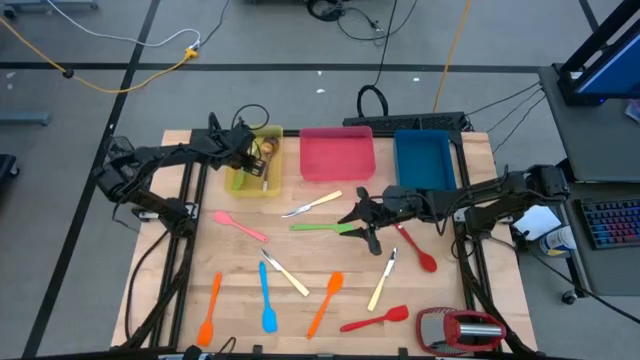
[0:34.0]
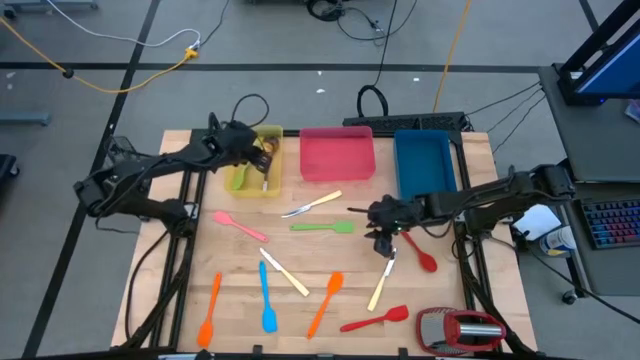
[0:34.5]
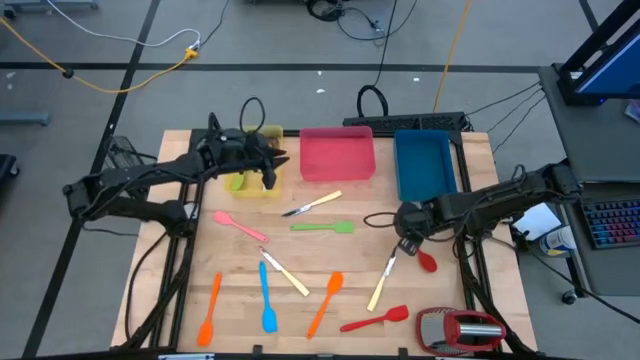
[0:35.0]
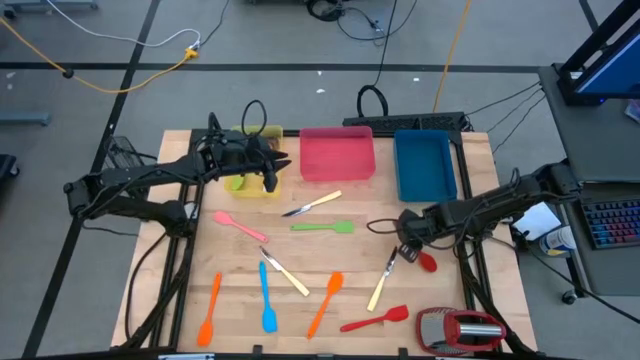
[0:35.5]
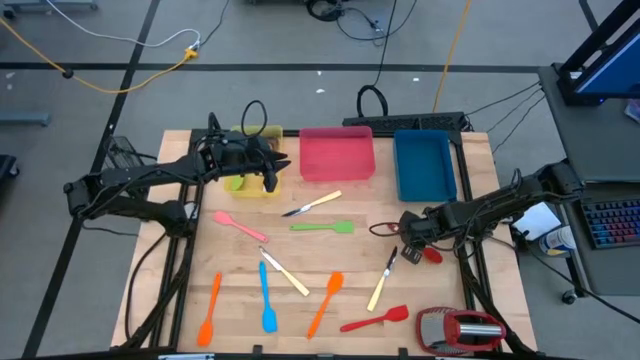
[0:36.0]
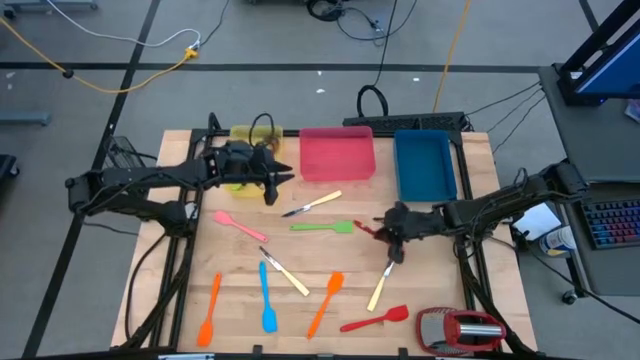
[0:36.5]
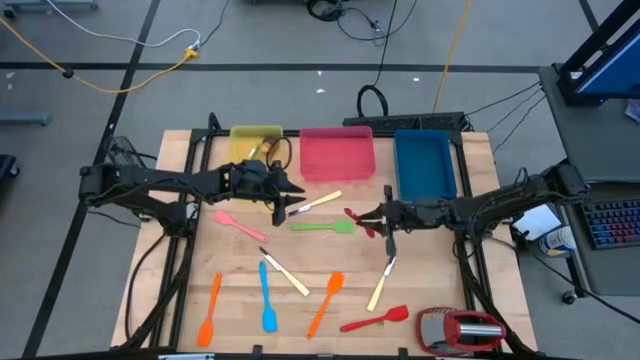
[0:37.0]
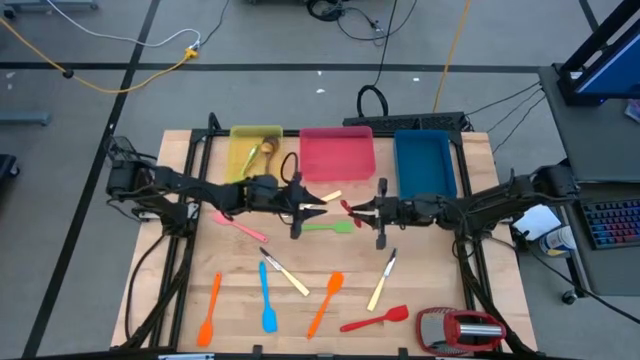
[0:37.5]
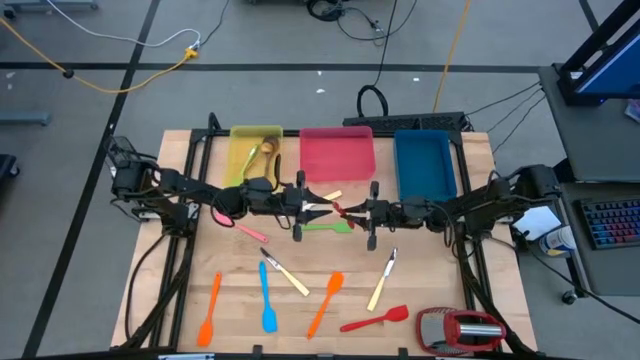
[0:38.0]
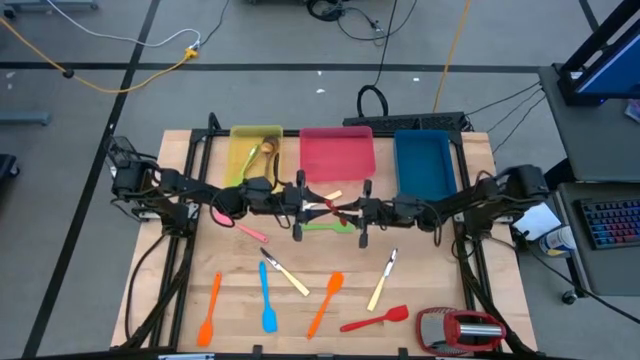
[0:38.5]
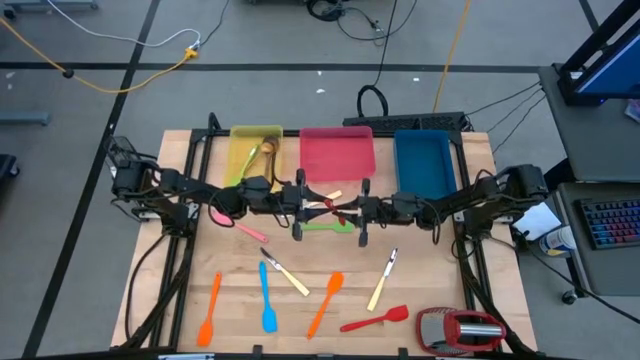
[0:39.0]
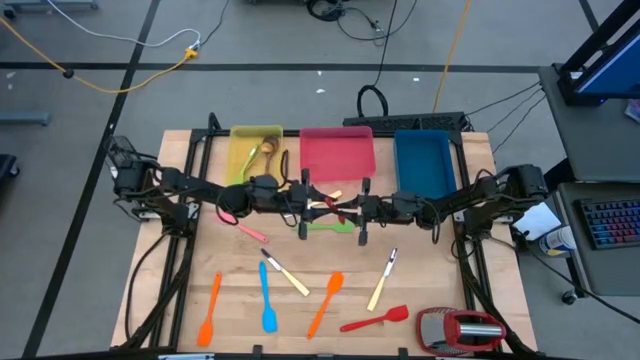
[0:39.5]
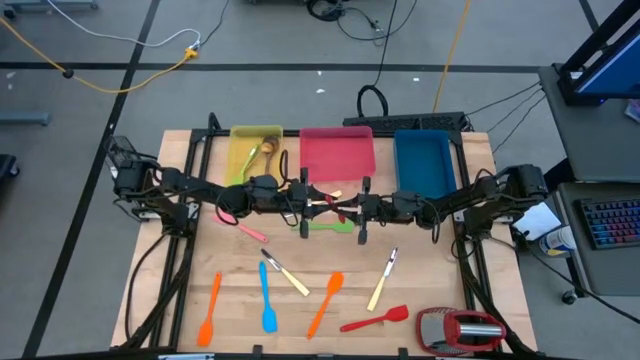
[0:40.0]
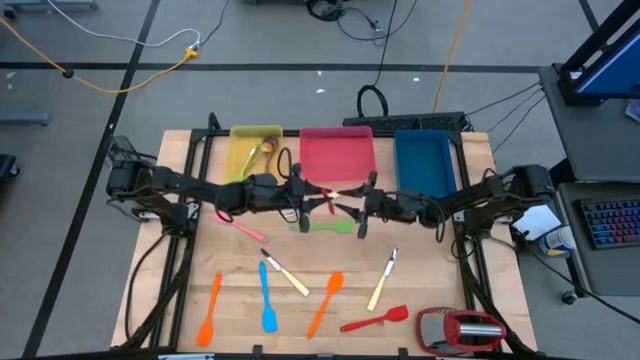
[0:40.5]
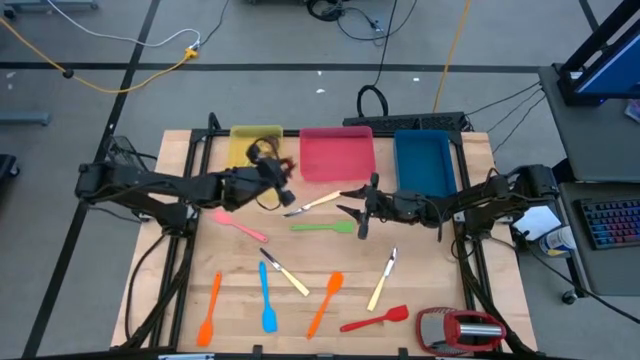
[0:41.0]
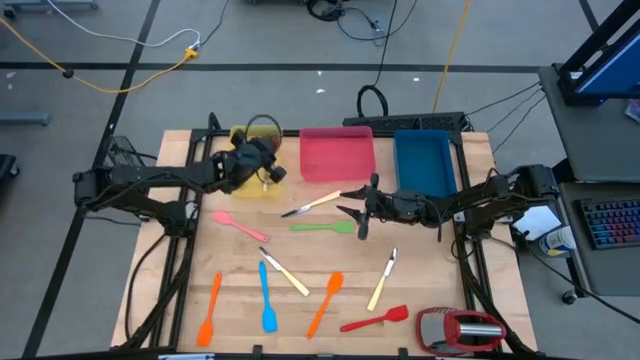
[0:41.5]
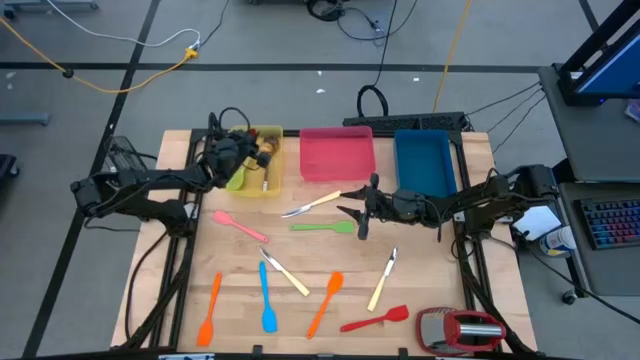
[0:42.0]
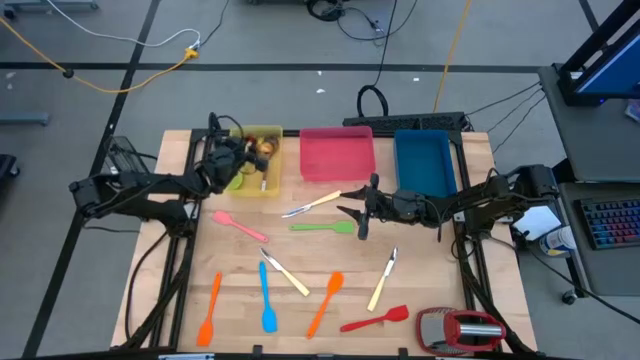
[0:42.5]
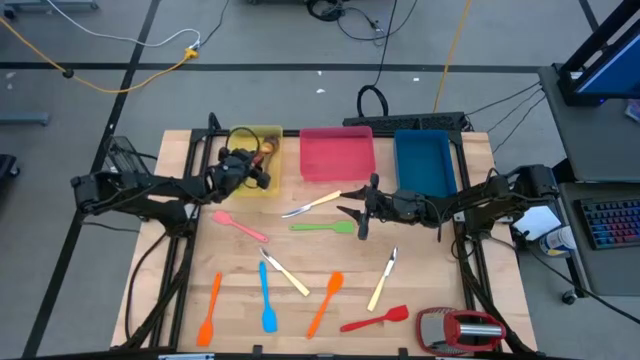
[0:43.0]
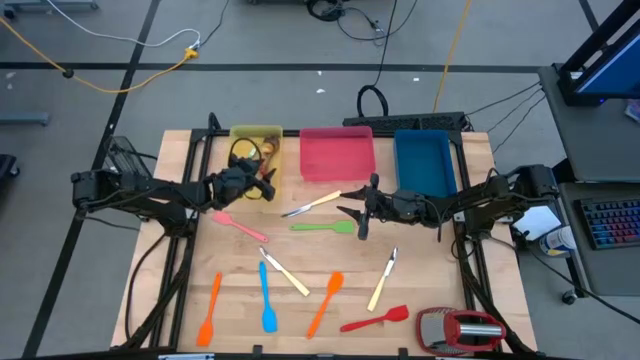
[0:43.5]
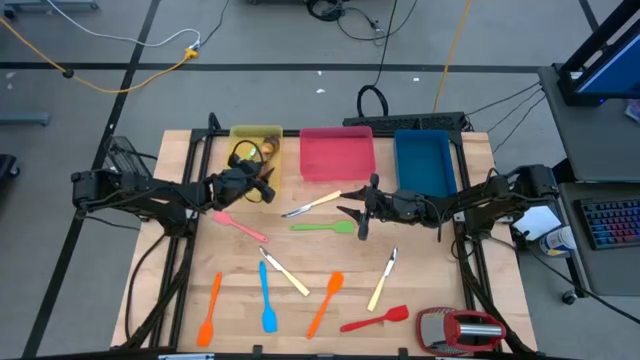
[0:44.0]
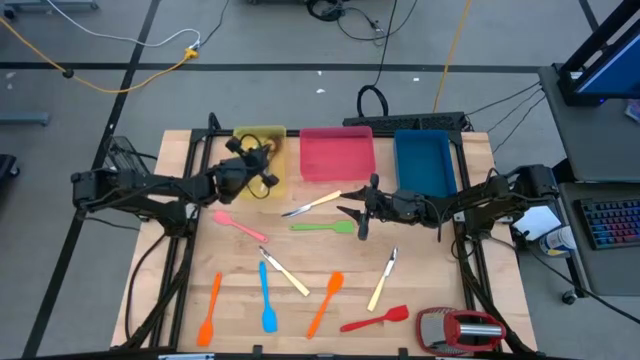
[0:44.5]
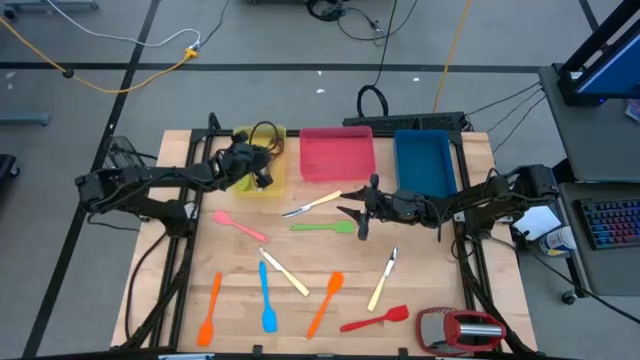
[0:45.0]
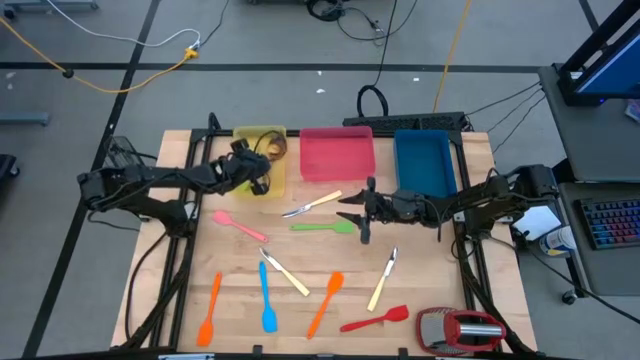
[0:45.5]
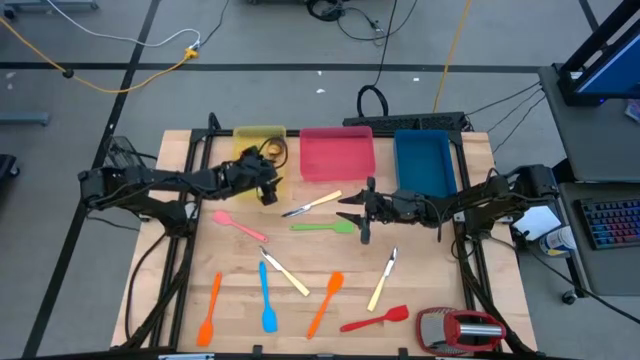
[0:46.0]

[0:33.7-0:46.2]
Task: Pick & Place Kitchen Items
Put the red serving spoon into the yellow bin

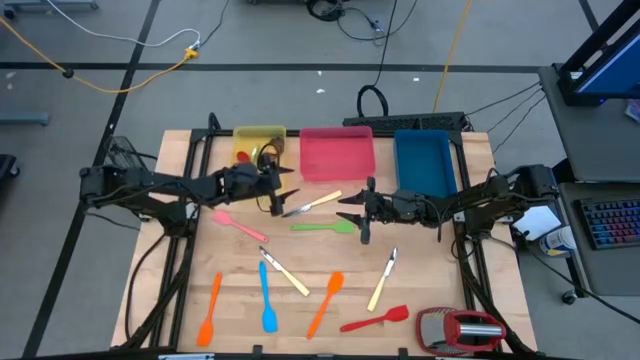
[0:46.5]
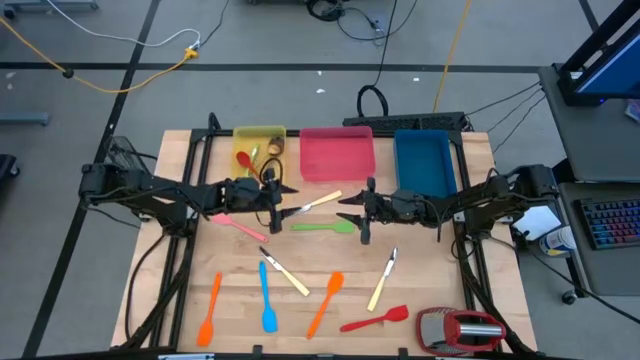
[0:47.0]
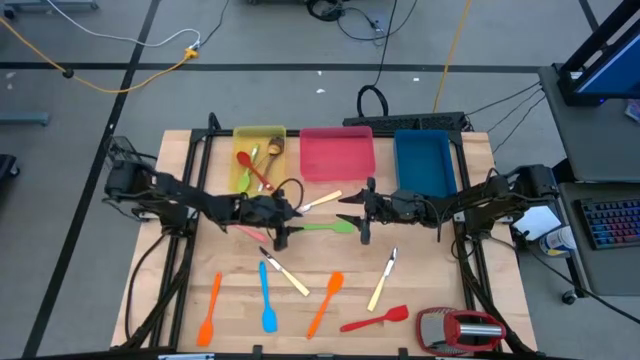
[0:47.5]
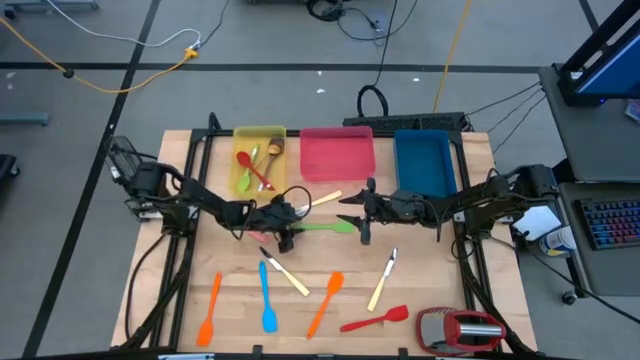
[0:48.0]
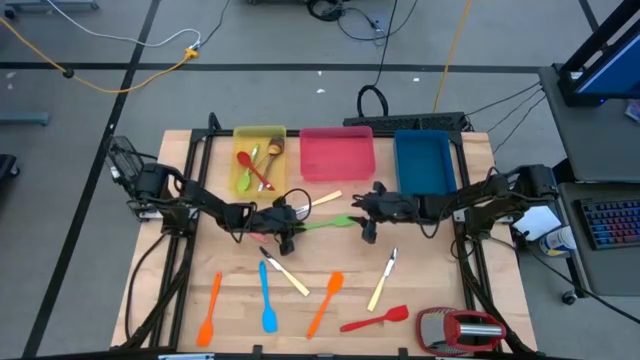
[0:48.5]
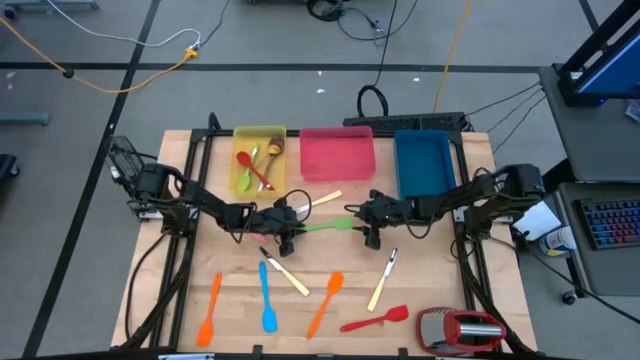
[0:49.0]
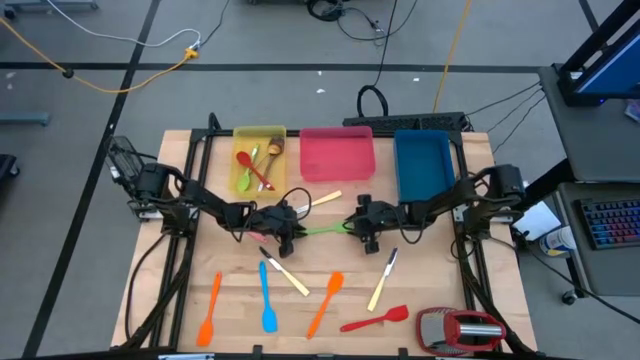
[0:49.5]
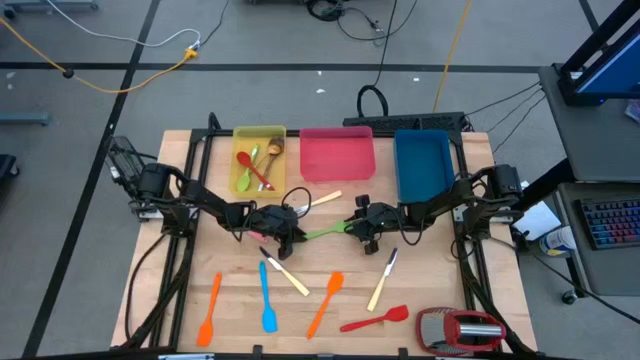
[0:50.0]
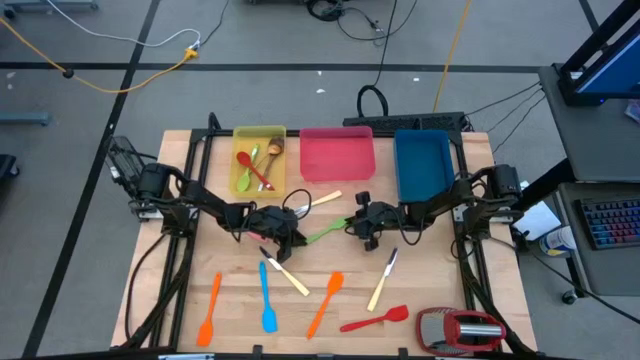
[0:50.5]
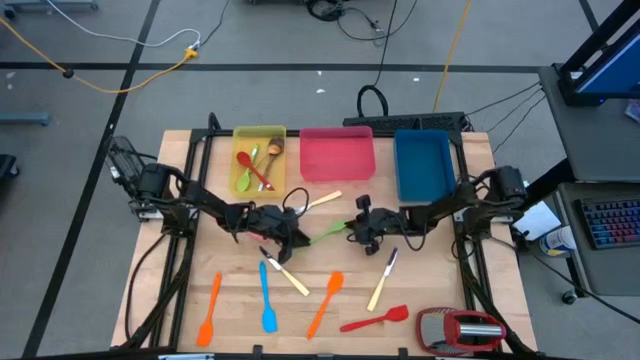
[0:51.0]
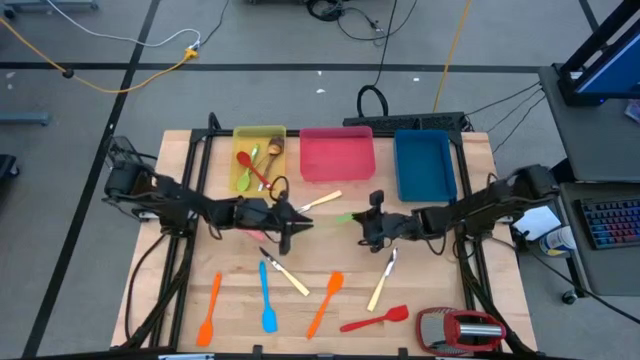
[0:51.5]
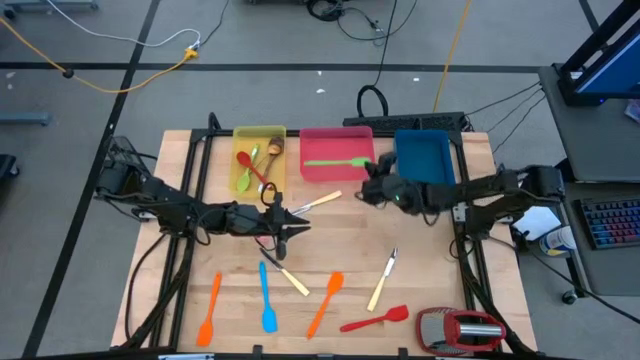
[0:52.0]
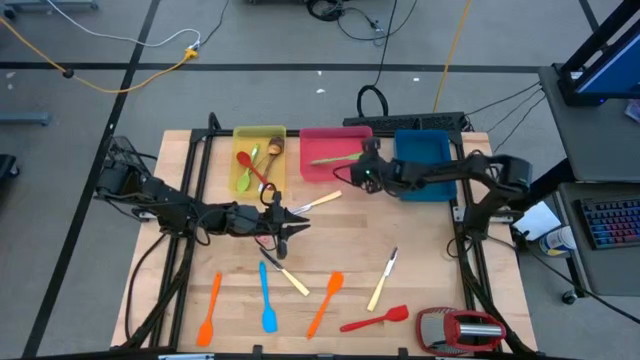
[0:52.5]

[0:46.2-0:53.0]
Put the green spatula into the red bin

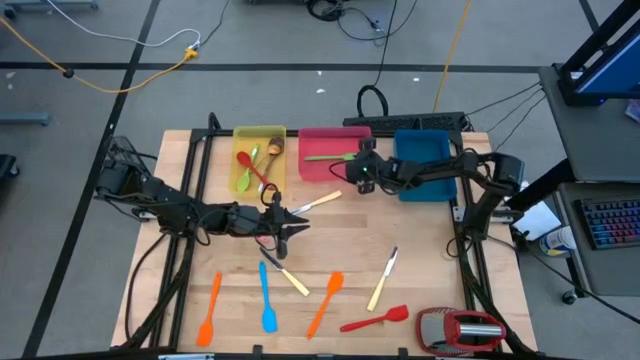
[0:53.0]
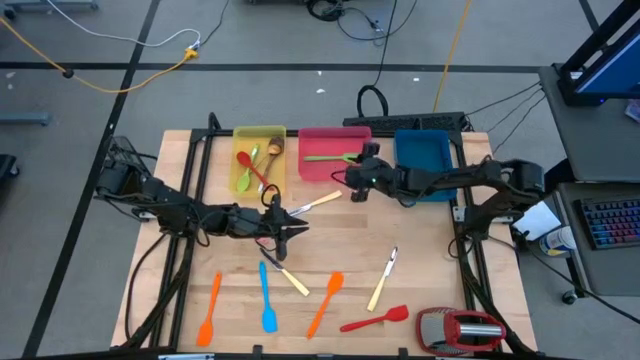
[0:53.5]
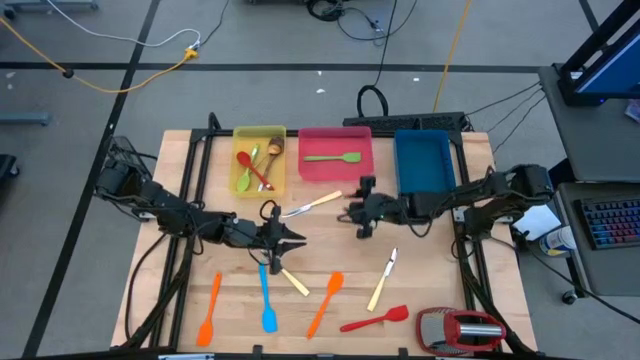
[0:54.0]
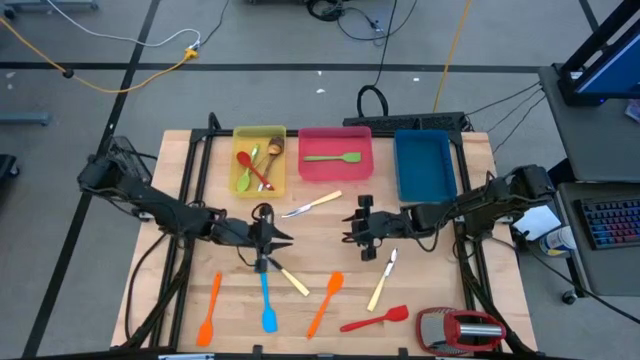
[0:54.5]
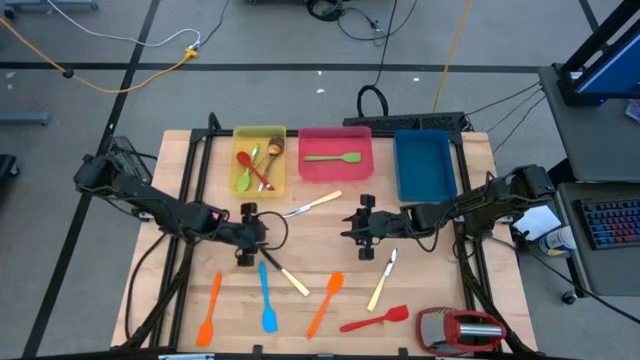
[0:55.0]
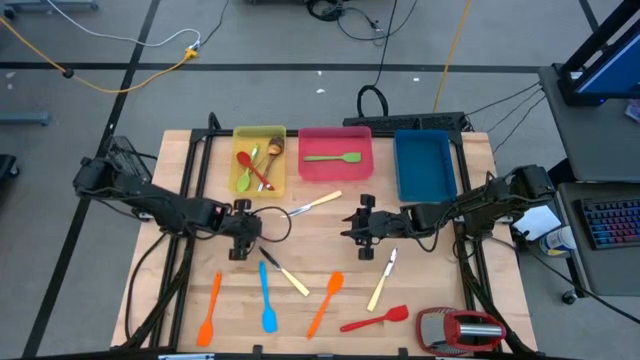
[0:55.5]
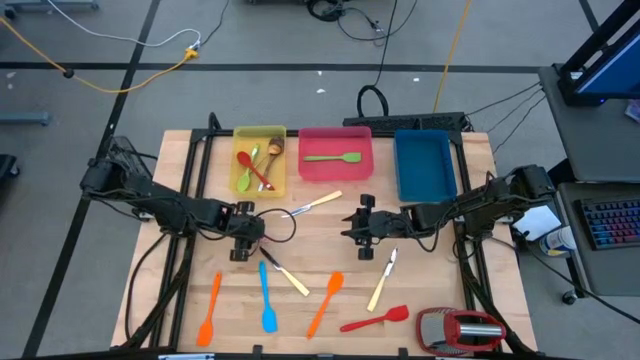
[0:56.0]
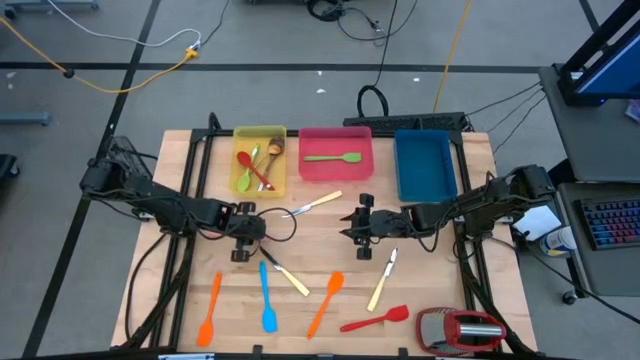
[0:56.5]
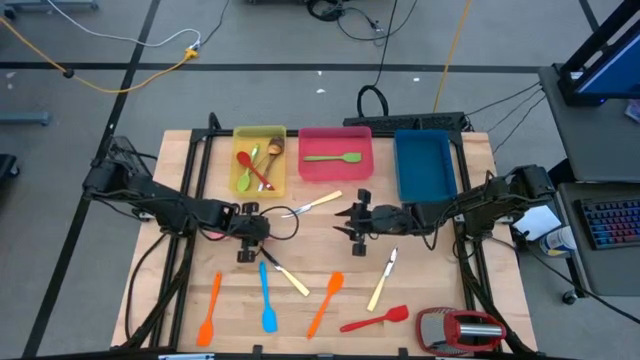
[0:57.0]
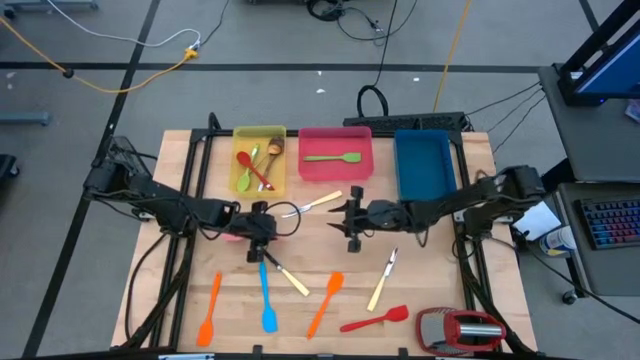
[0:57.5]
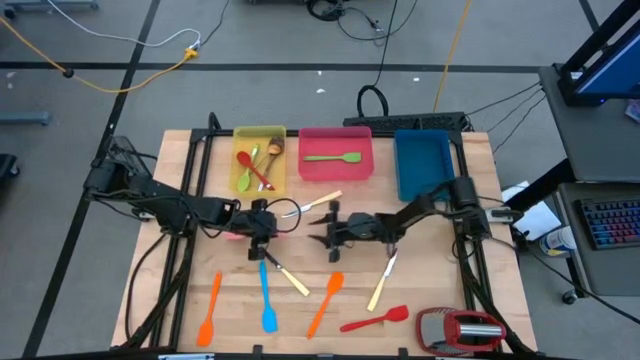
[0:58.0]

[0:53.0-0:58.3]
Put the pink spatula into the red bin
